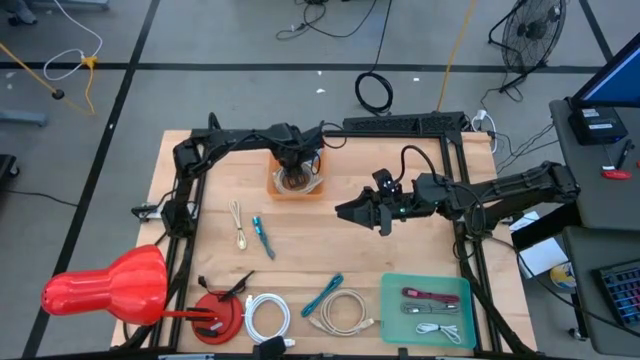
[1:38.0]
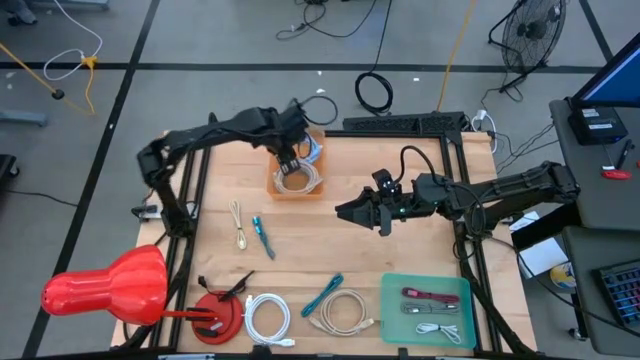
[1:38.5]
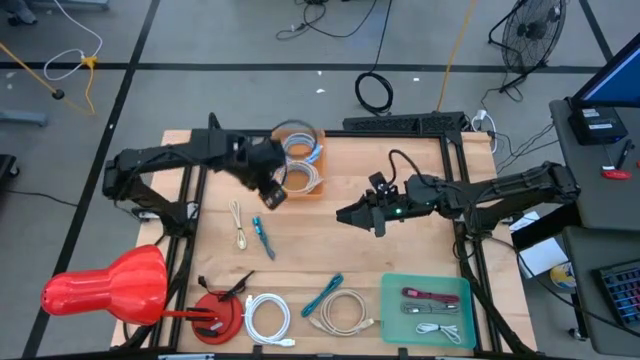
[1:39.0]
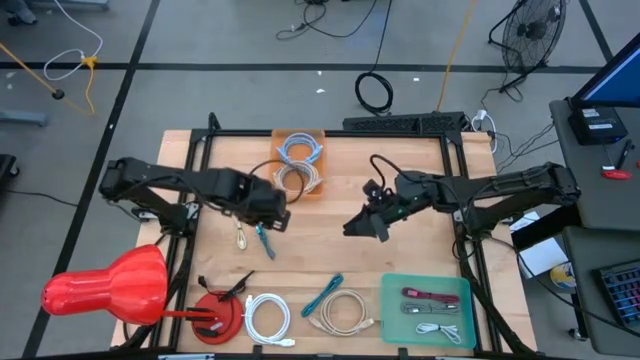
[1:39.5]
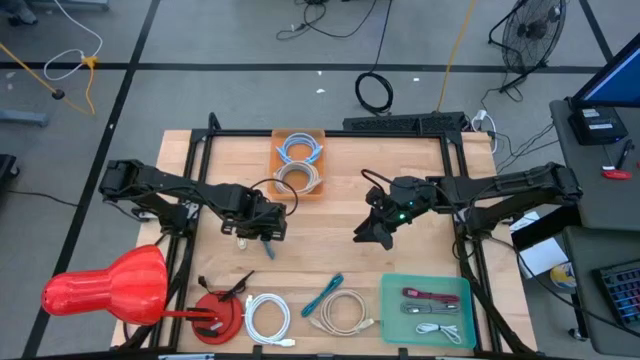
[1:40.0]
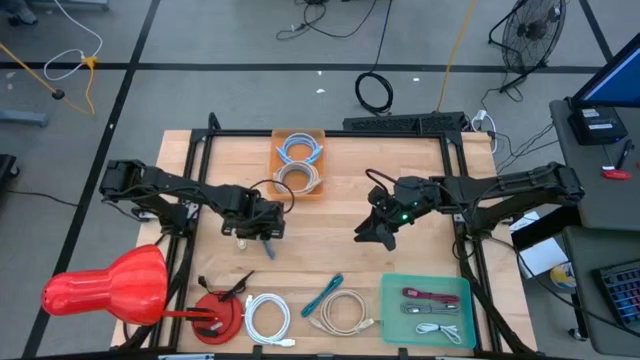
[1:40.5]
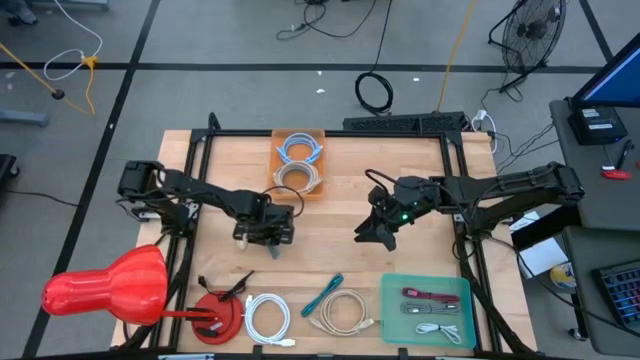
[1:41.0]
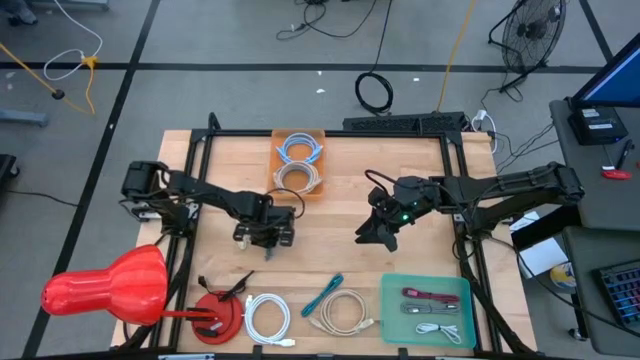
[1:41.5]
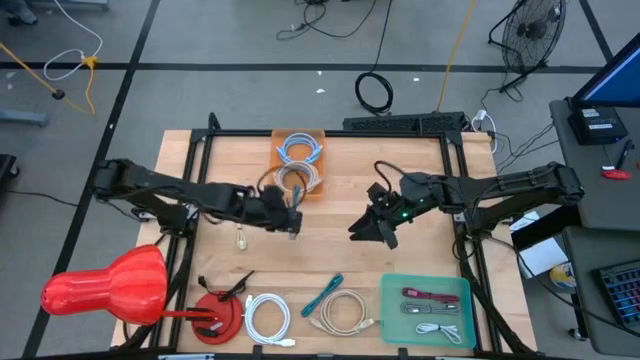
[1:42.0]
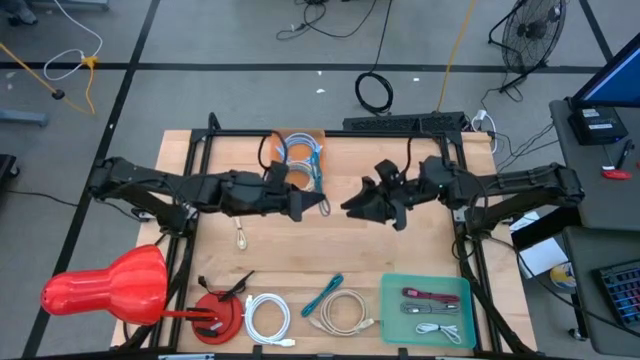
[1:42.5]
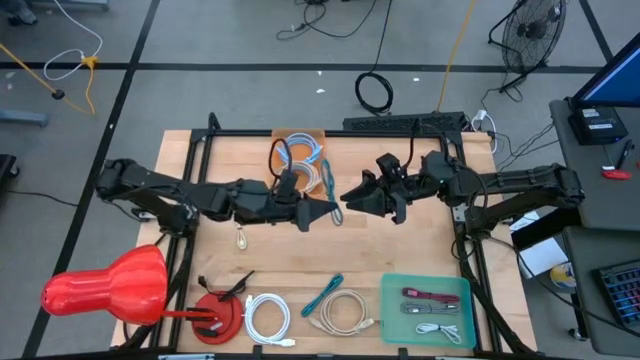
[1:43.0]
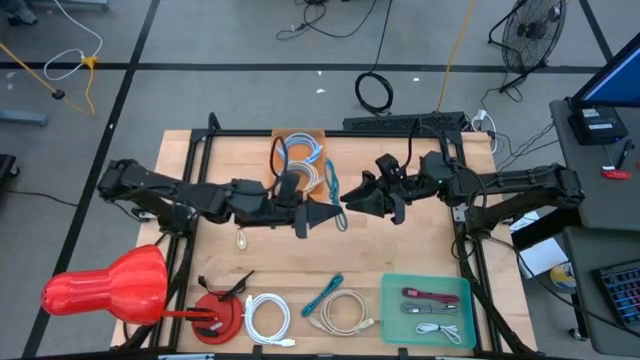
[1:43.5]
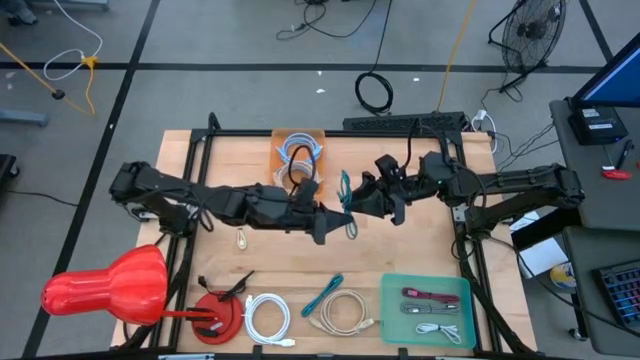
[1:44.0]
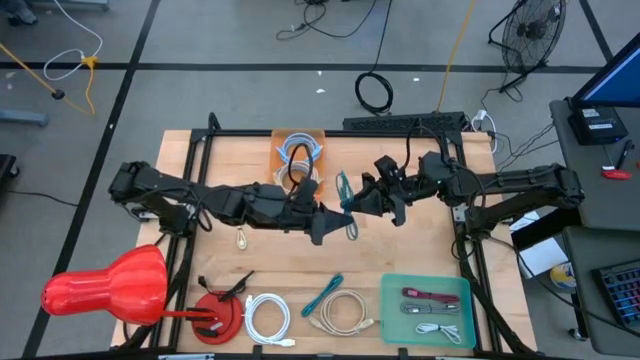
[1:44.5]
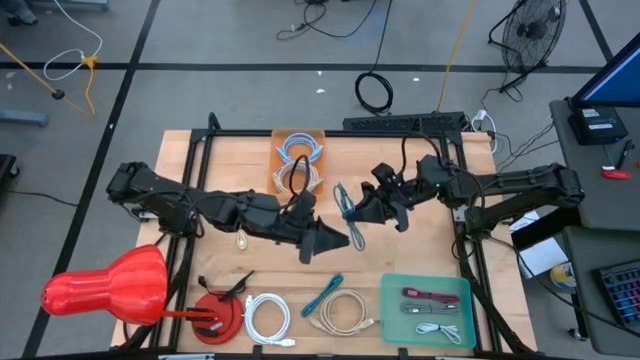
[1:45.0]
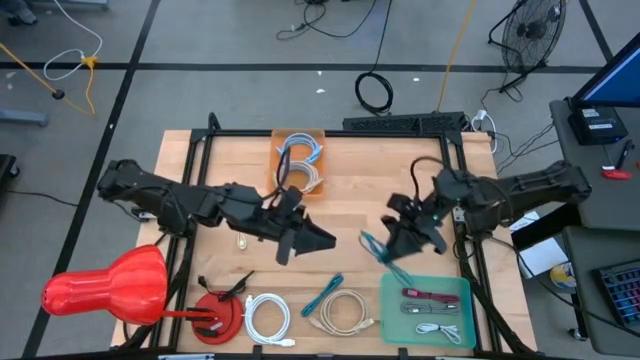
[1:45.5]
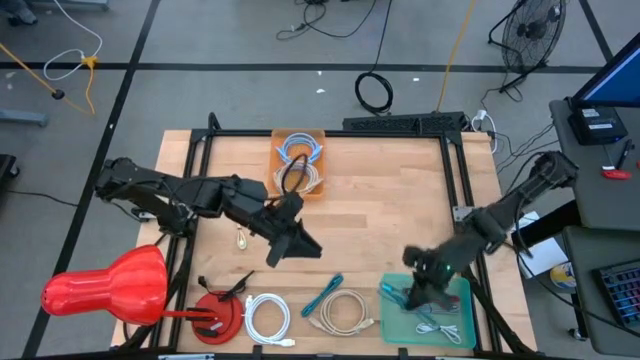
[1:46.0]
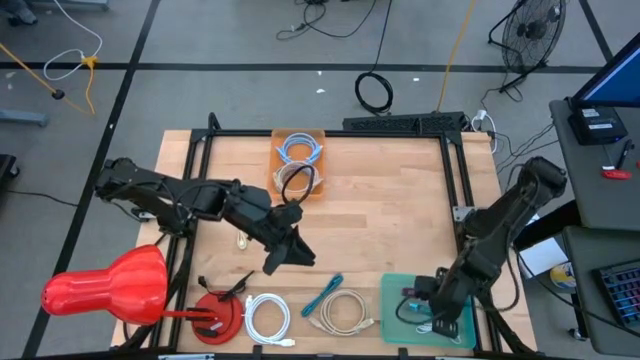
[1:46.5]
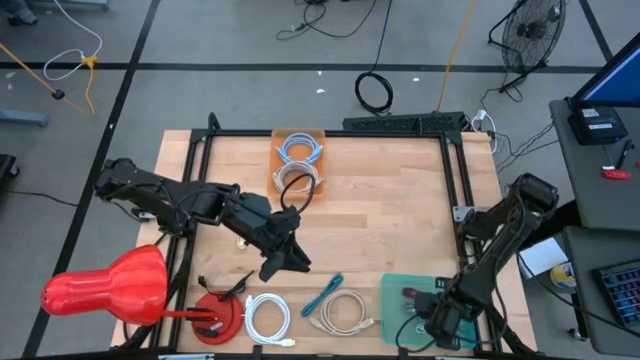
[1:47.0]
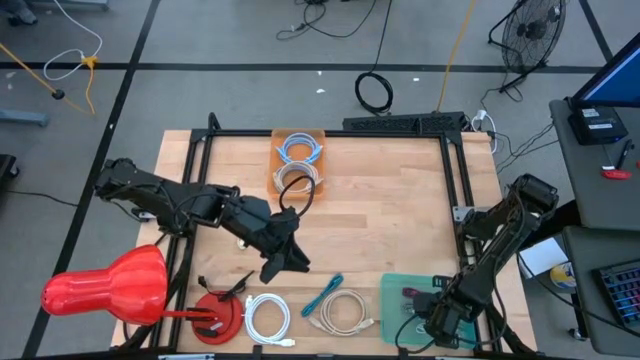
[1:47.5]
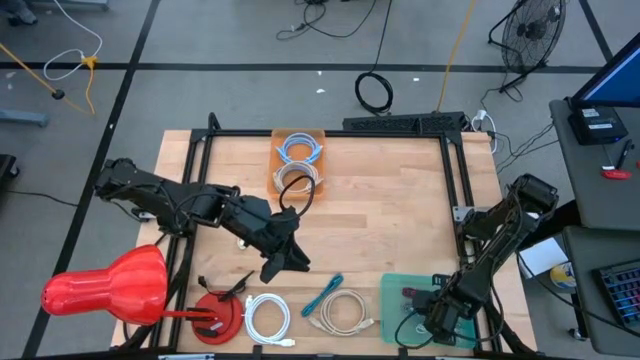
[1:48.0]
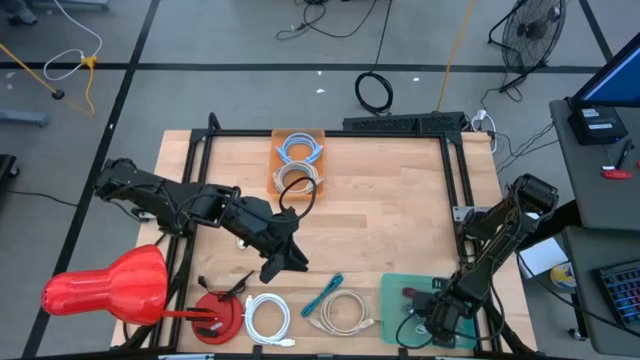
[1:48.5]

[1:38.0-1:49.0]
Task: Pick & Place USB Port
Put the top blue patterned usb cable into the grin bin

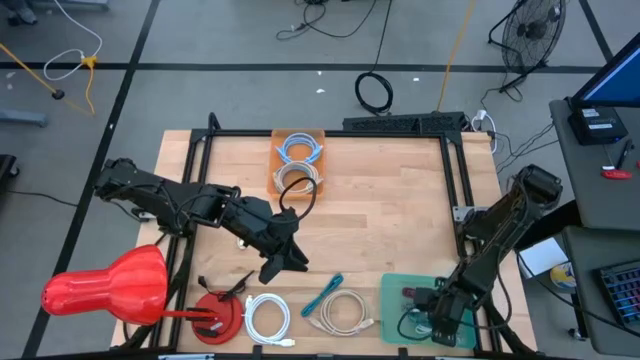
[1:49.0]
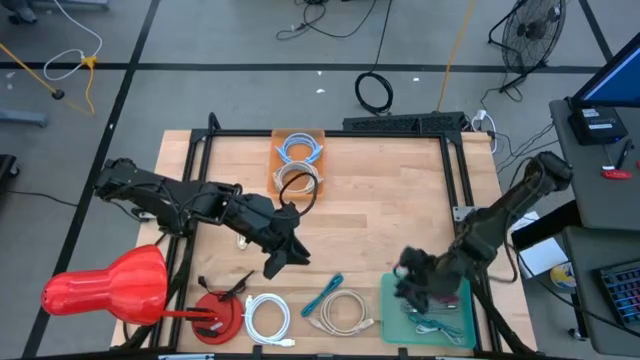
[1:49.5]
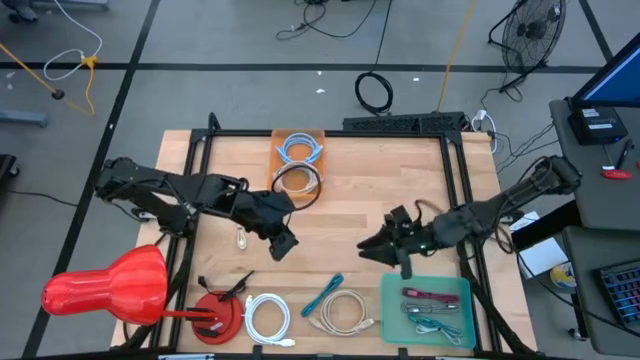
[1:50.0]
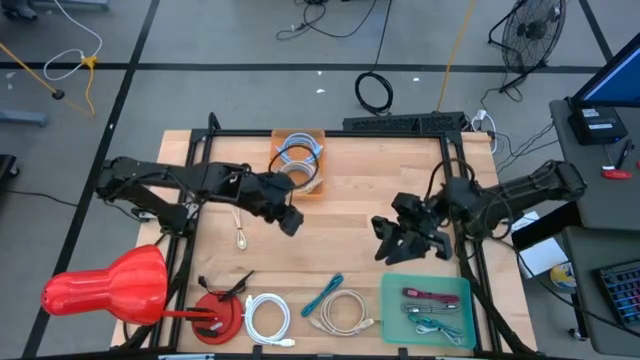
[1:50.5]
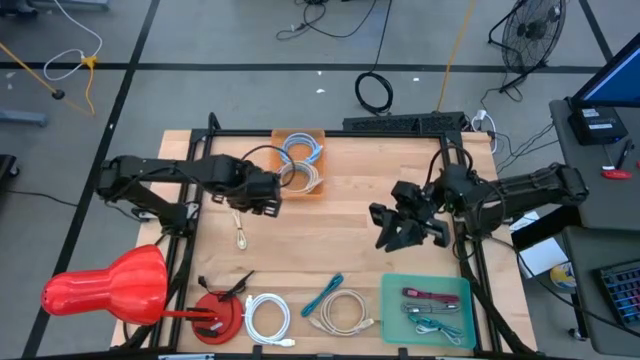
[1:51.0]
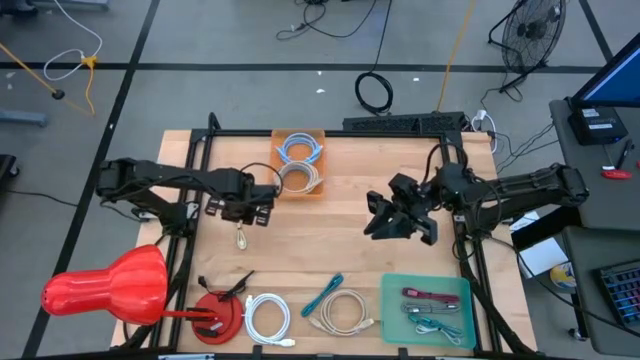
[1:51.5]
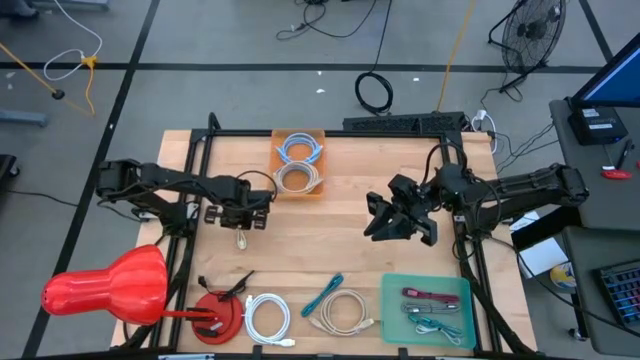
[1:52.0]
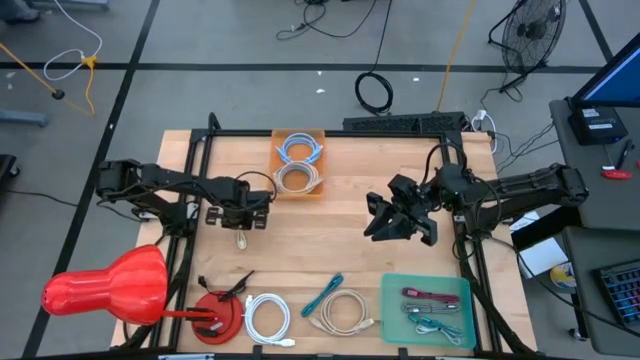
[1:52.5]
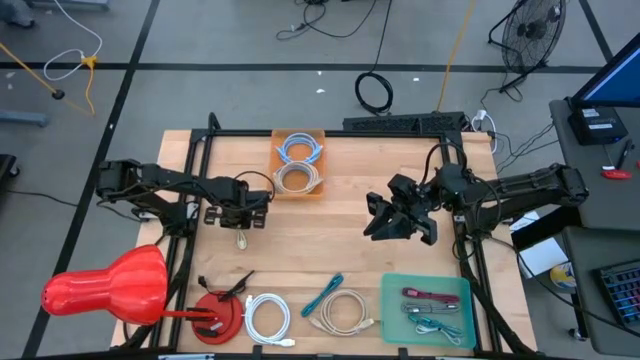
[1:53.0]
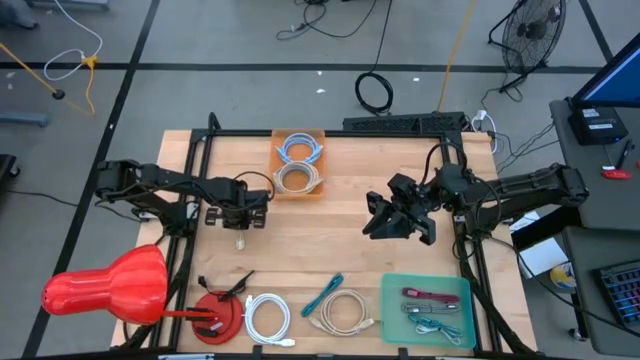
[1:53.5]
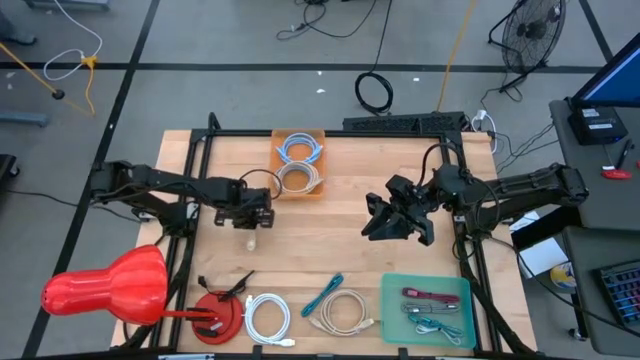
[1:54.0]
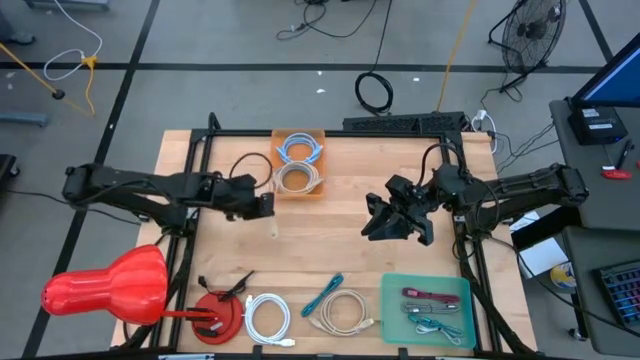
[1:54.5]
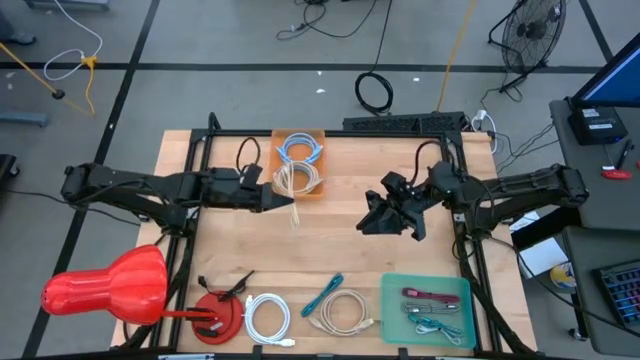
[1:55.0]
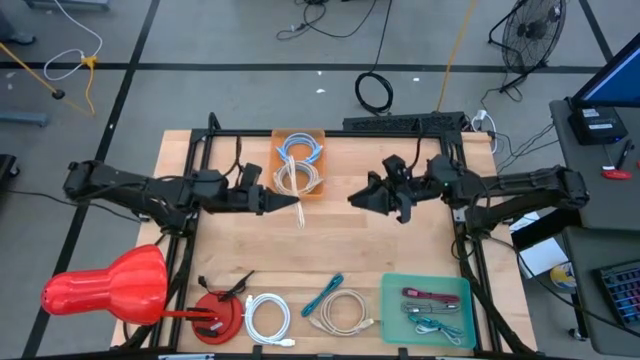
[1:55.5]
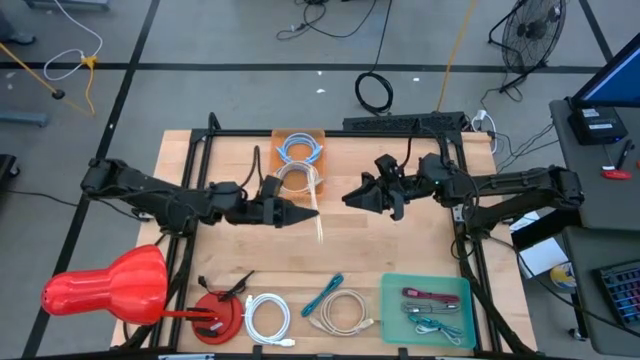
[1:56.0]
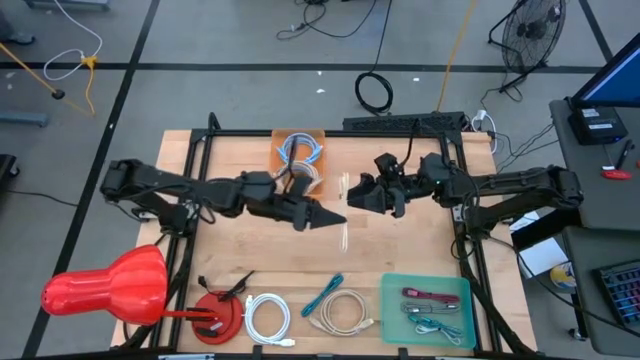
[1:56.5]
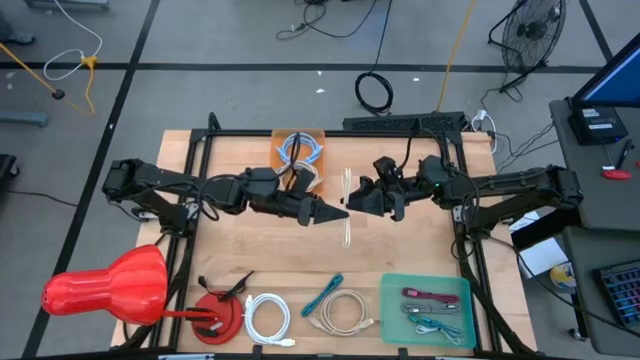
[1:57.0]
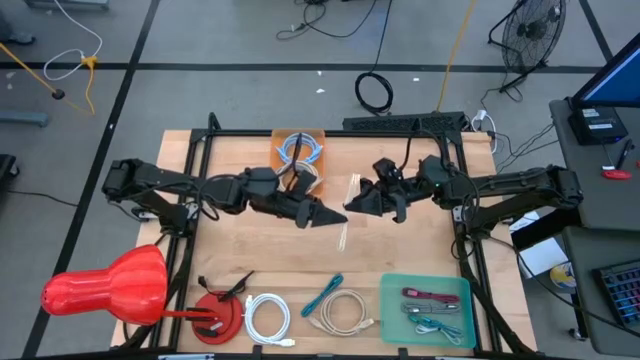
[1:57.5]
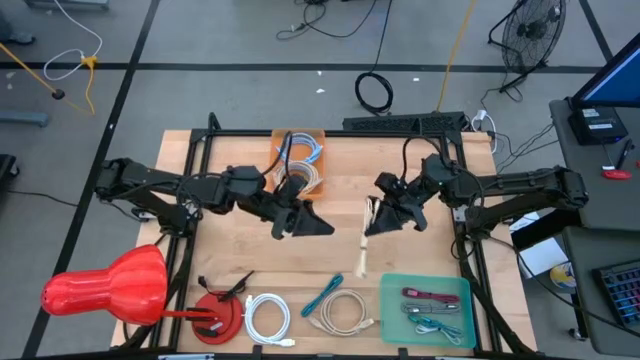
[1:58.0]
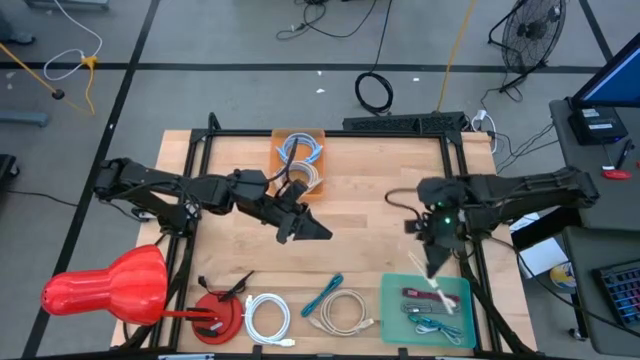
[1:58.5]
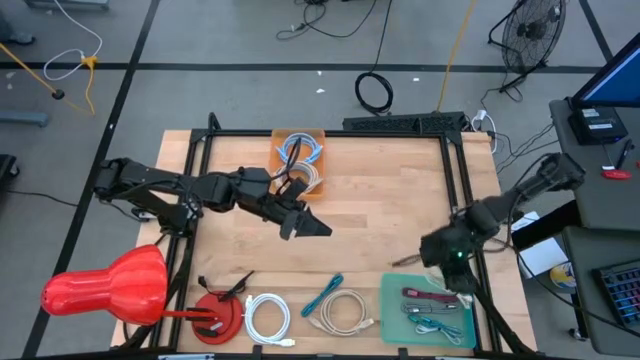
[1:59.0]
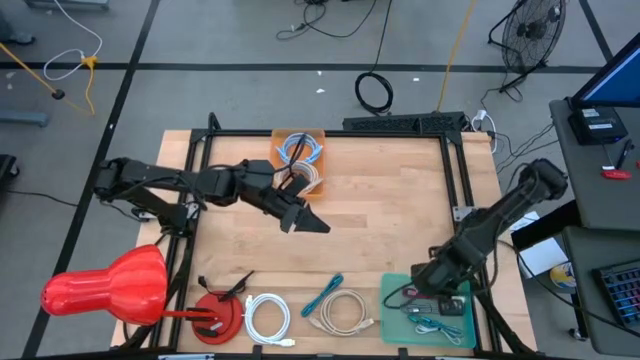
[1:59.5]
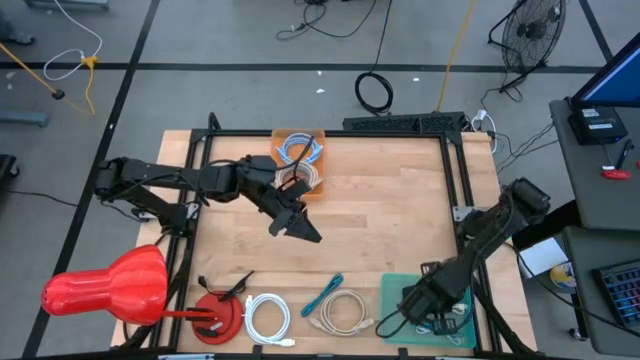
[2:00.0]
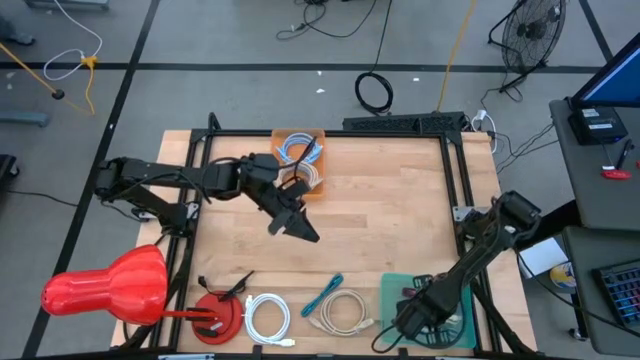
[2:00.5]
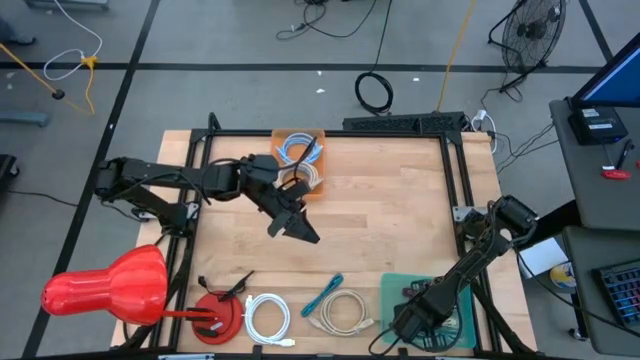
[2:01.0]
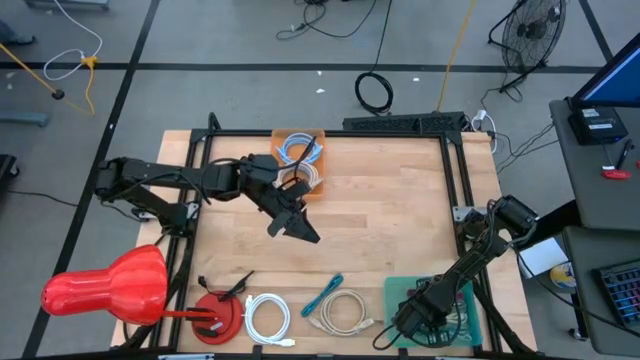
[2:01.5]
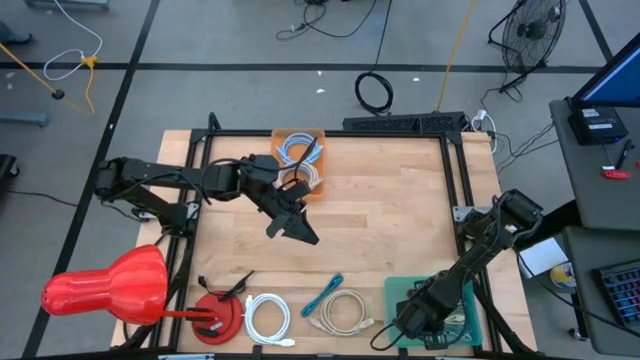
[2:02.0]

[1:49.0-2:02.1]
Put the top brown usb cable into the blue bin
